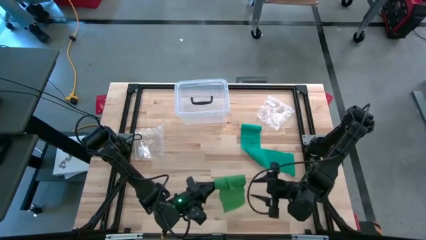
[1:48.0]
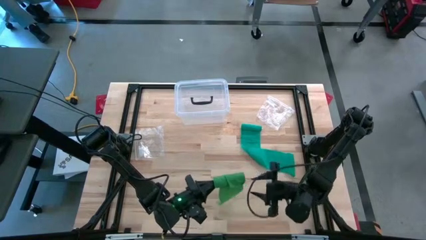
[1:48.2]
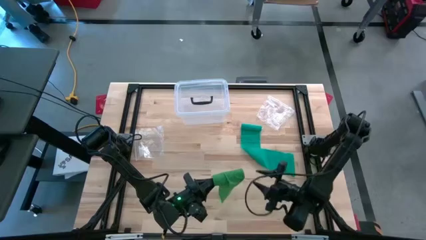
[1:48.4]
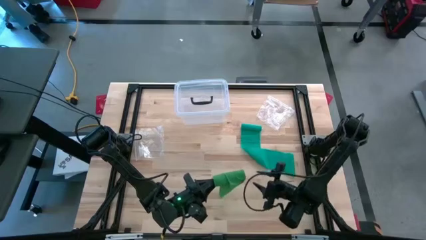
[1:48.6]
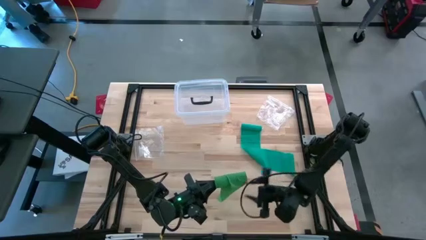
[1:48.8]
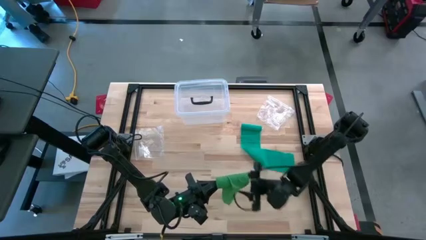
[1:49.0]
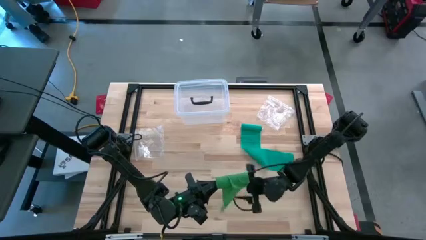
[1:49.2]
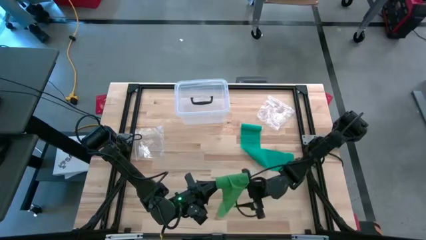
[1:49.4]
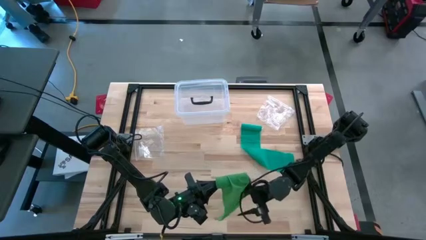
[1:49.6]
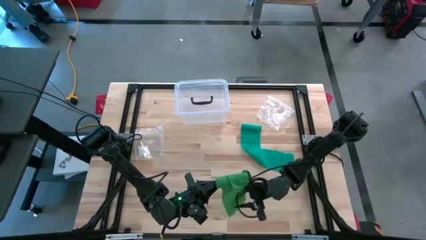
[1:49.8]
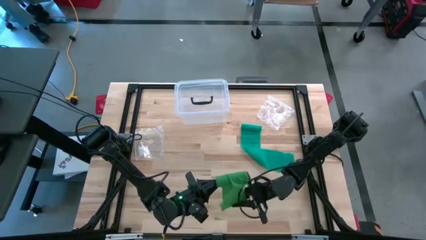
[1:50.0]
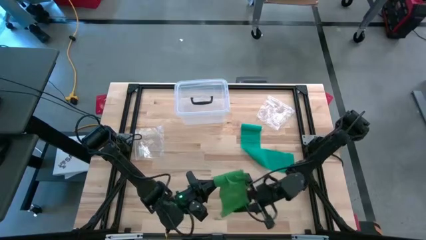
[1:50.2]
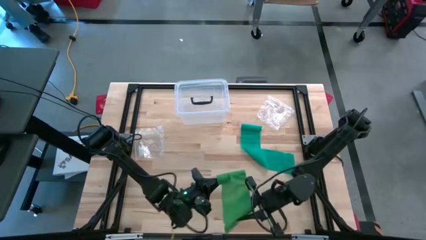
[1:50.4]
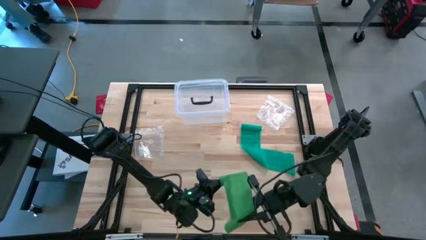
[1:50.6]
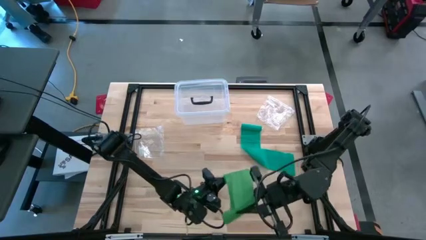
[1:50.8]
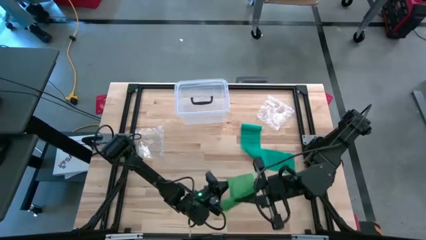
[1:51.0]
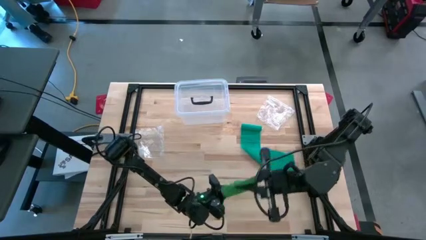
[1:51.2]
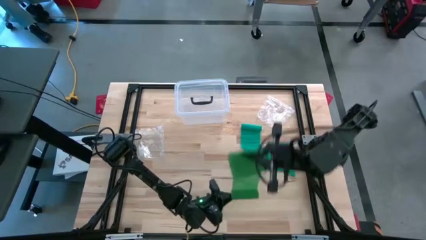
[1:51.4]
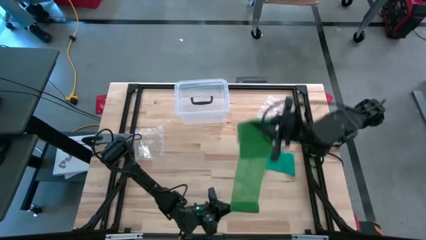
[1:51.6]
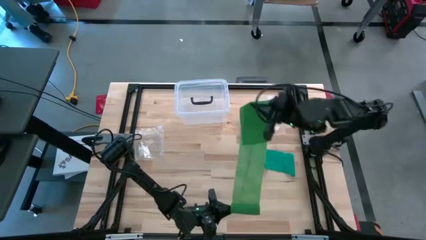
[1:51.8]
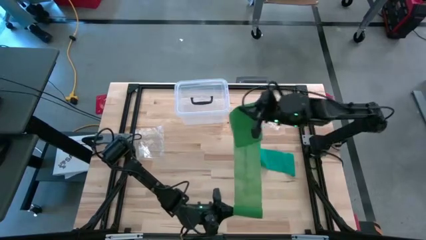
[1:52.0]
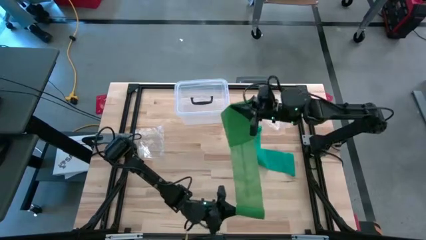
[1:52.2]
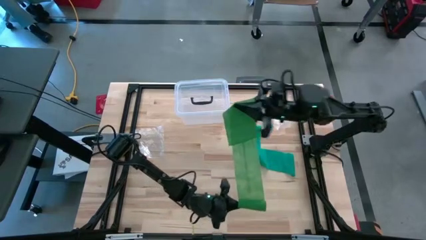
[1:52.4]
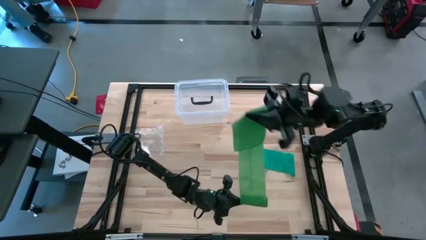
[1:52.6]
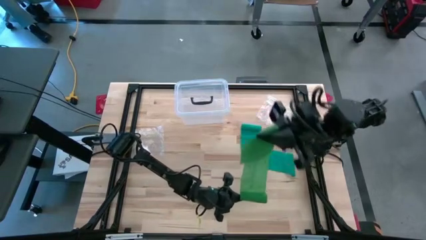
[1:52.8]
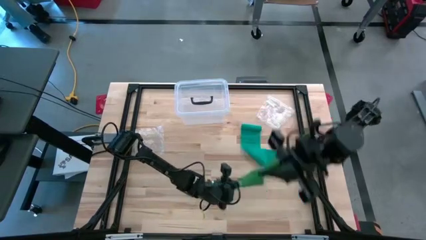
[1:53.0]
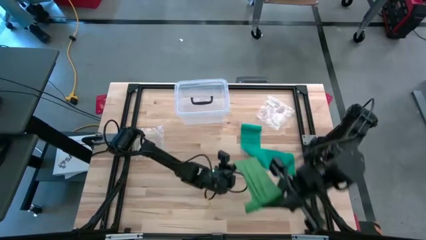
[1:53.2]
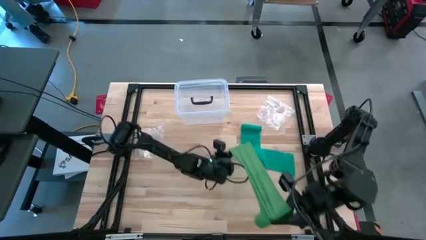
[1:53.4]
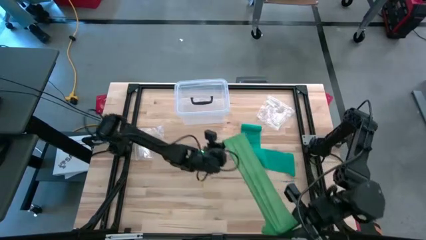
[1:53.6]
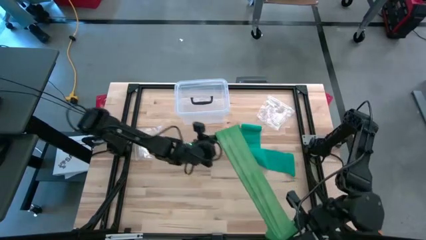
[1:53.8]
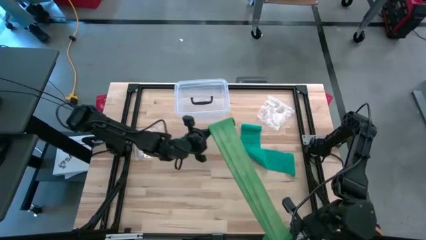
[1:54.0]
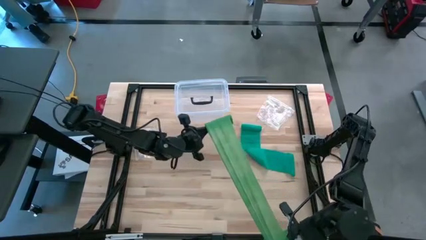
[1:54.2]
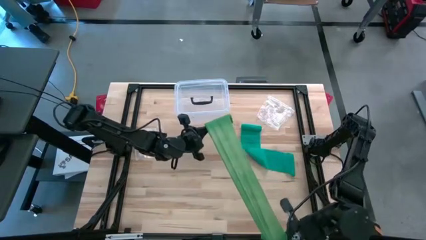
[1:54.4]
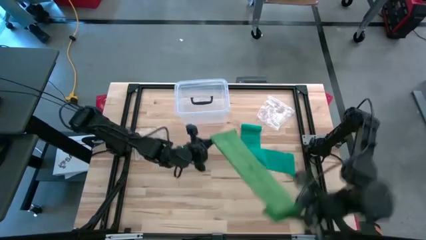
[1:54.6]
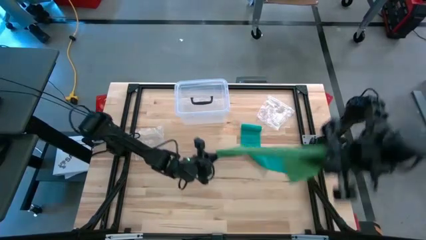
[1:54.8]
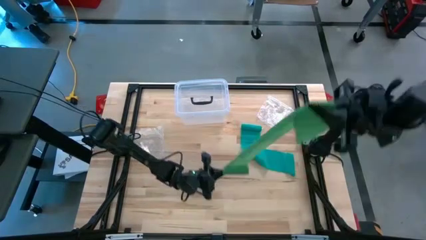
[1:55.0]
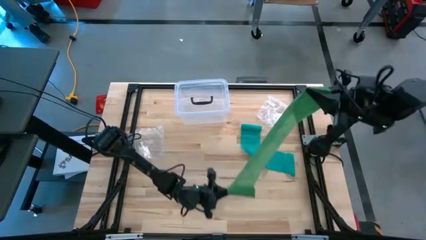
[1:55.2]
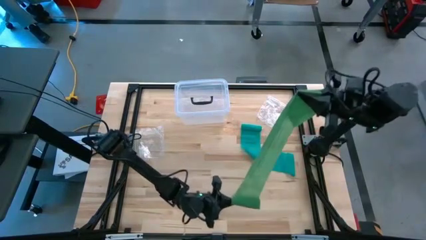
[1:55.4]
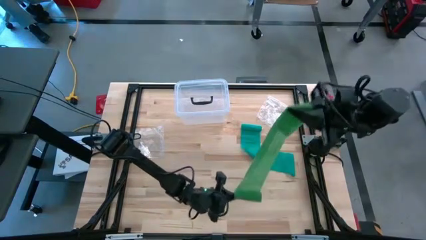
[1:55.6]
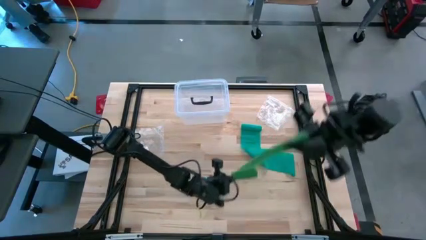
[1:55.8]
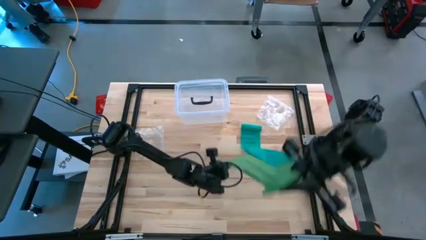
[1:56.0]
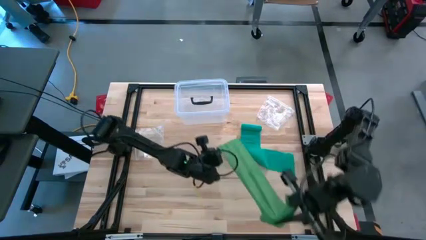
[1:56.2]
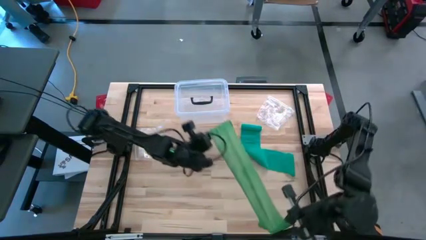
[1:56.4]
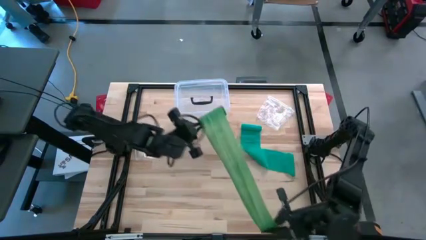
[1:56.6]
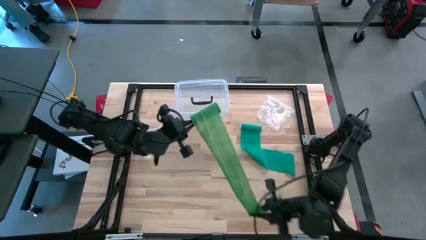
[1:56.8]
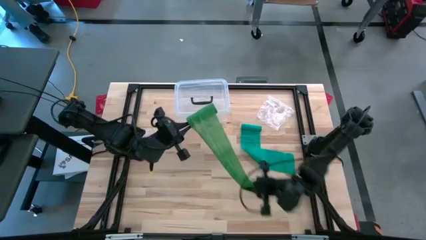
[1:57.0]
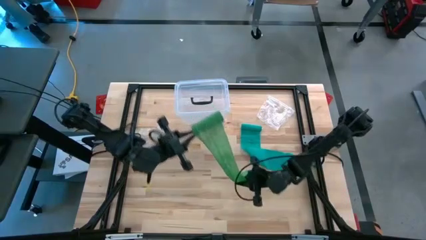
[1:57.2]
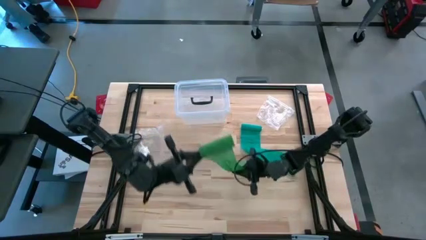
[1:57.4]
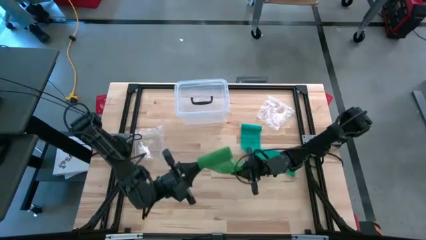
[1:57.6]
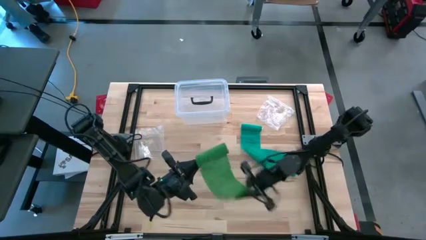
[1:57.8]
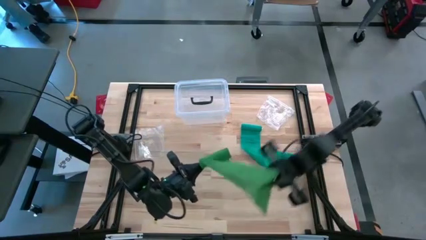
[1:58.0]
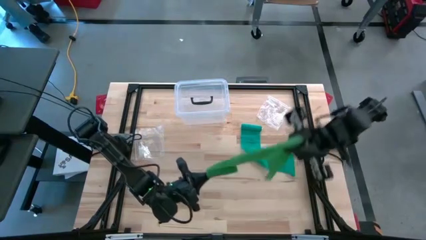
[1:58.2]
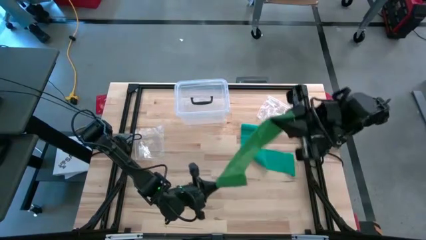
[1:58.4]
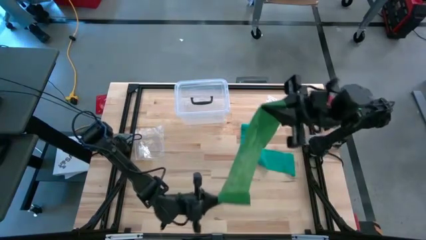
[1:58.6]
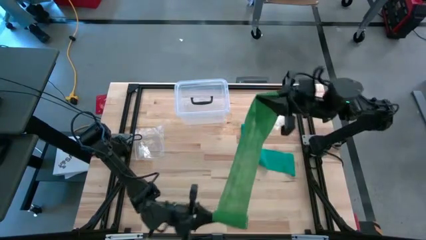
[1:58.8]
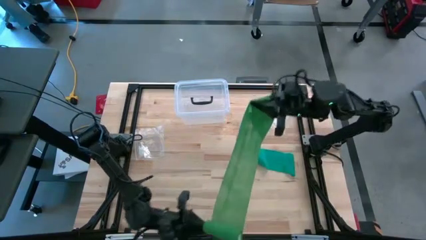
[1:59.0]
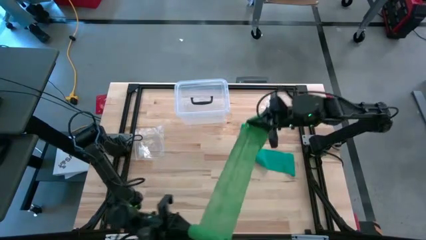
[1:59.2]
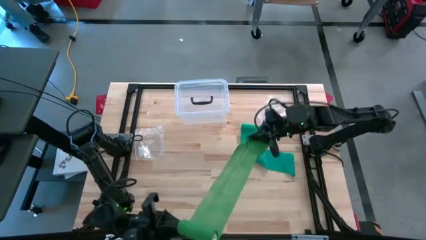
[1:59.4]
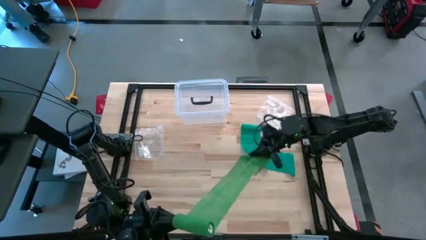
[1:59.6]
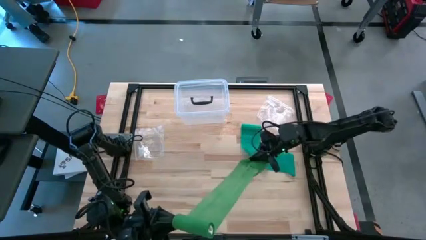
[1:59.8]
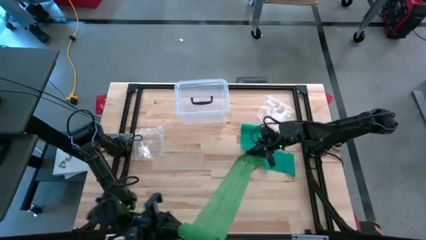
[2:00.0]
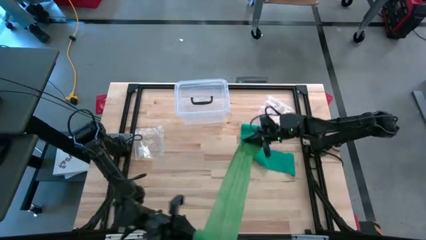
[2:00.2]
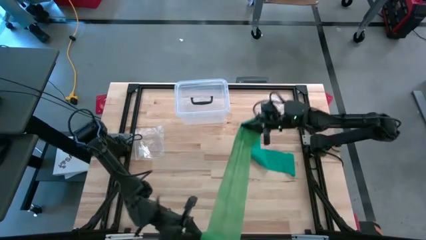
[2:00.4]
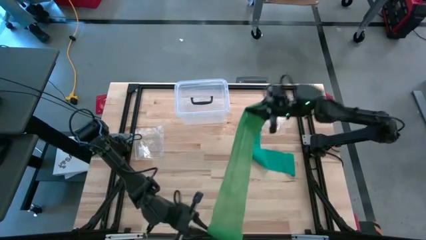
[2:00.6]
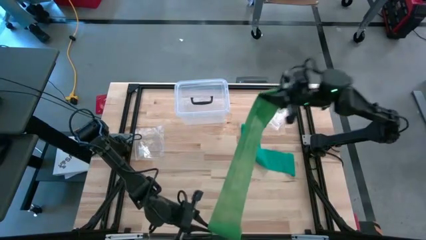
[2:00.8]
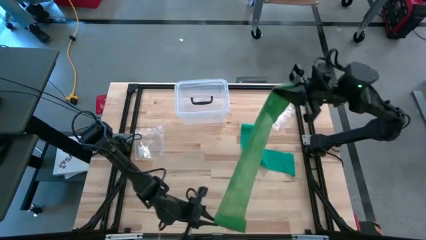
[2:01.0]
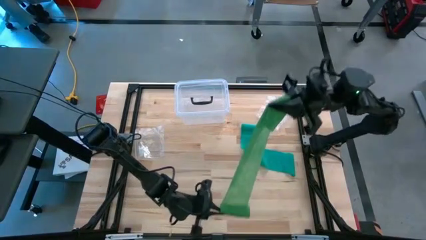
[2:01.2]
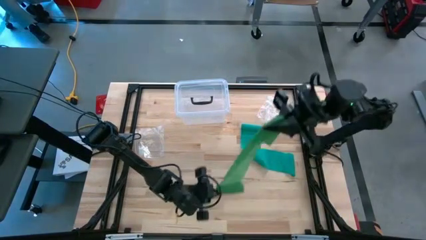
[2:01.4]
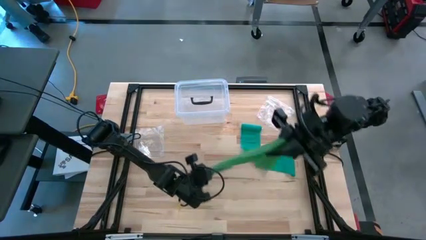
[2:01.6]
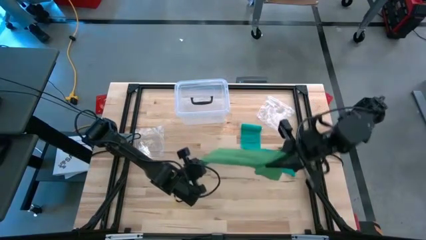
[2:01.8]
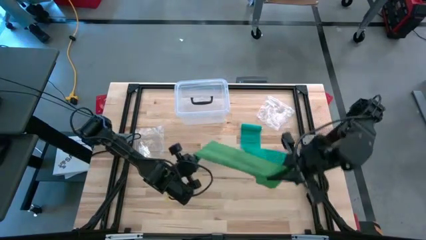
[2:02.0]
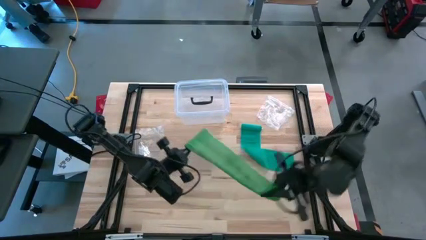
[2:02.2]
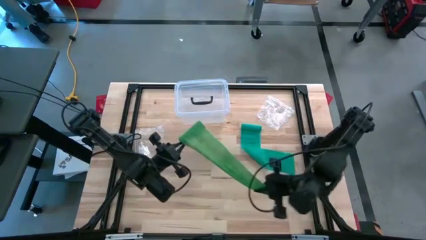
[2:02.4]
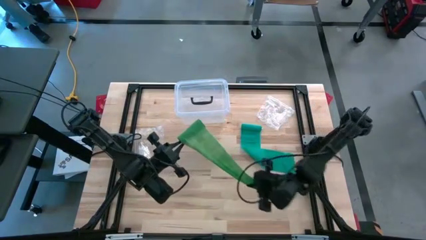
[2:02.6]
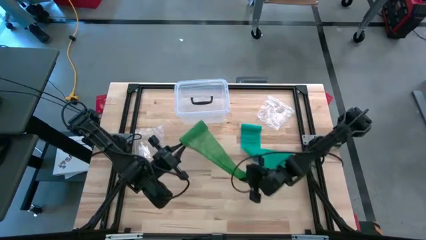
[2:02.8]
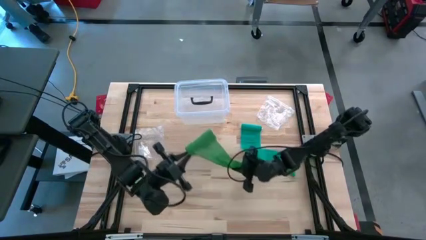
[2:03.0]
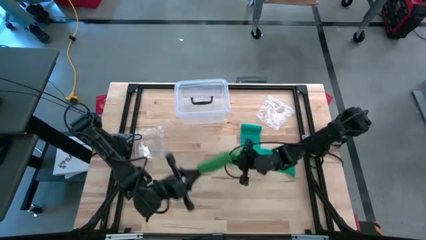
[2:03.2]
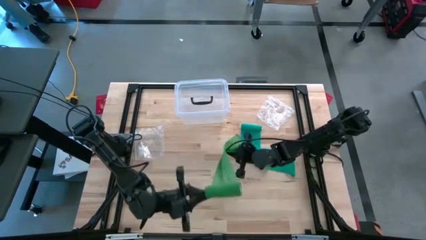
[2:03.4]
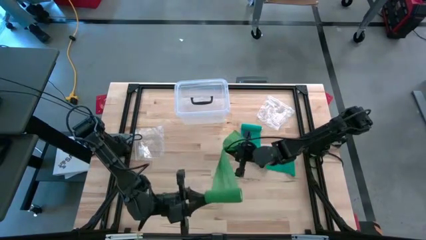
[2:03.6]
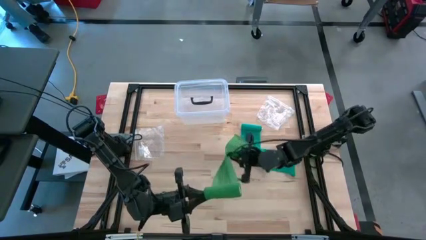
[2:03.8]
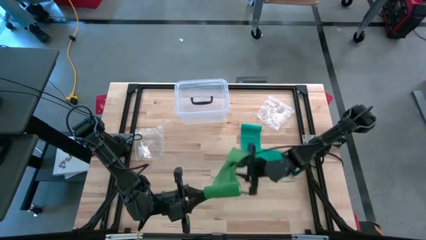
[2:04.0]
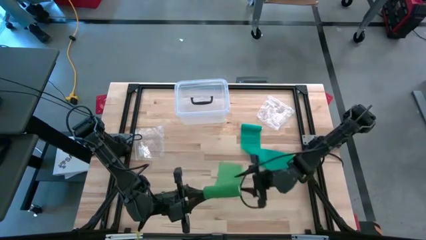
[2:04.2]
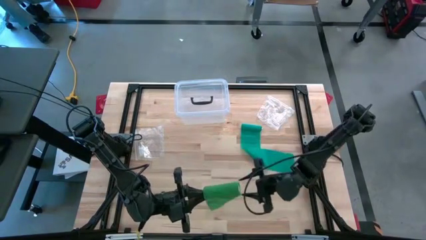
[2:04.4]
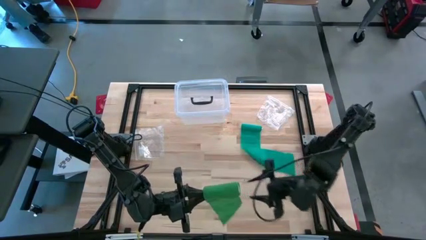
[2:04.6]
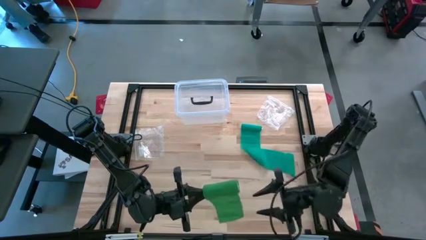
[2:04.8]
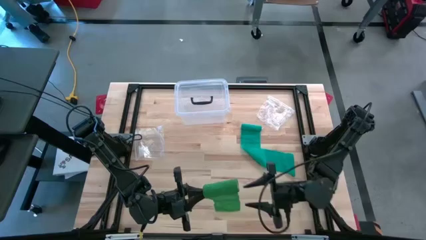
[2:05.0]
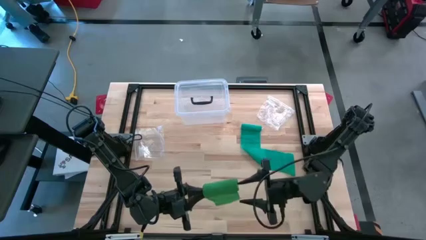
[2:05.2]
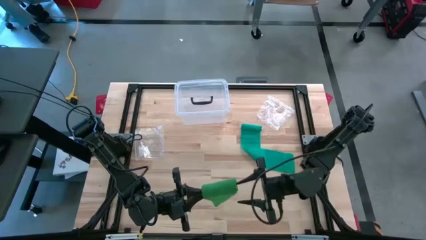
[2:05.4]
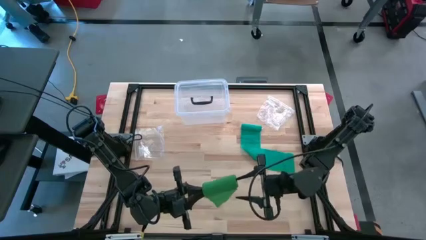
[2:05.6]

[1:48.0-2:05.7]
Task: Roll bandage
Roll the green bandage
